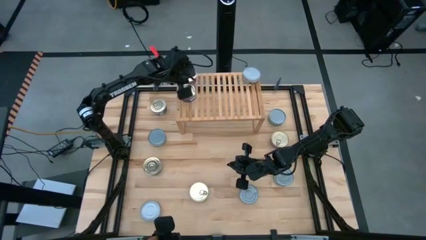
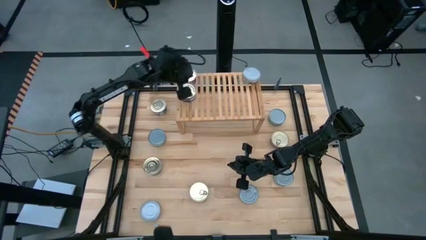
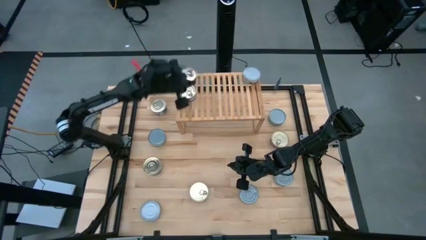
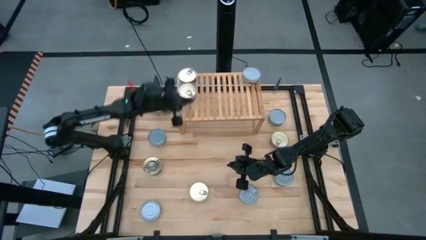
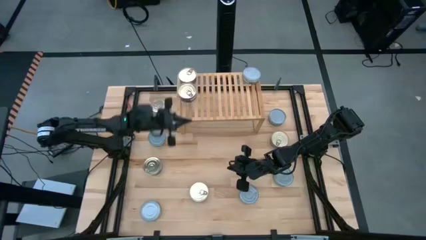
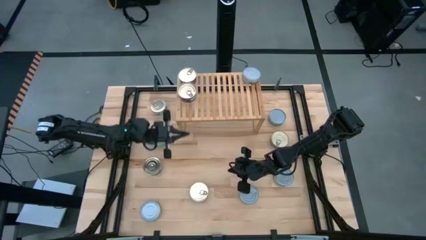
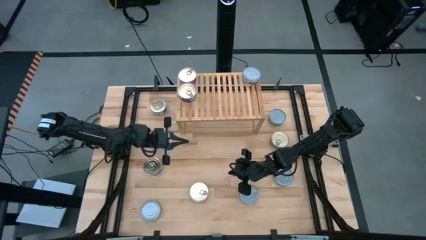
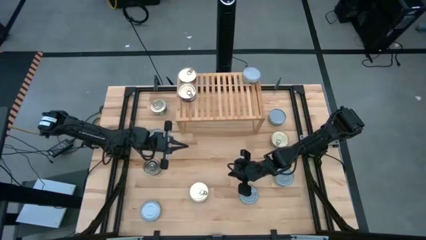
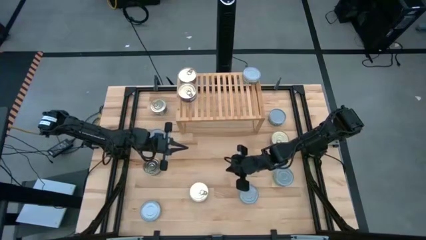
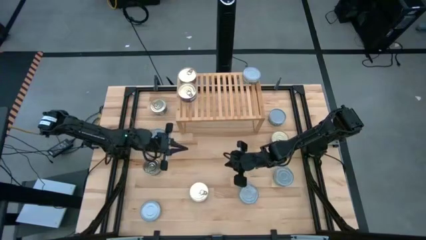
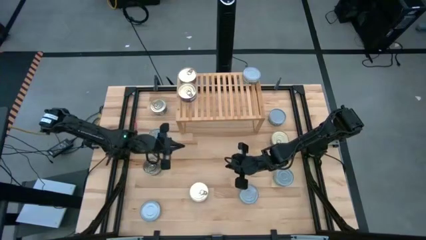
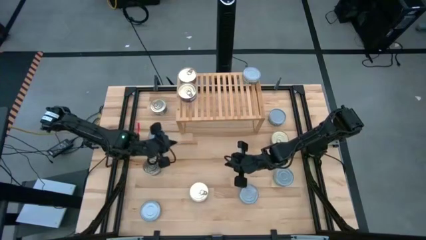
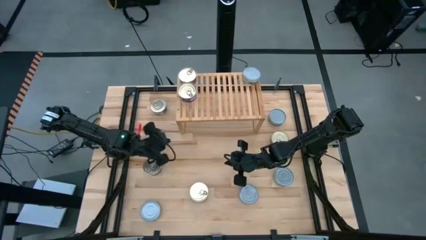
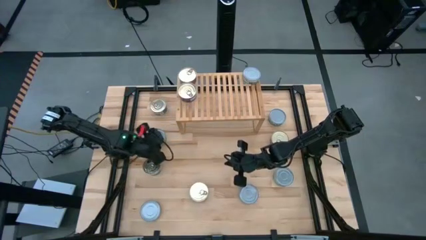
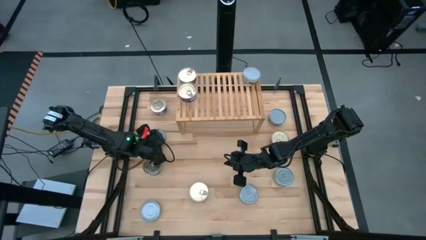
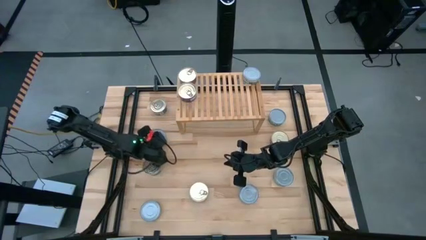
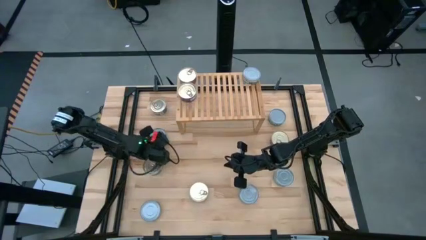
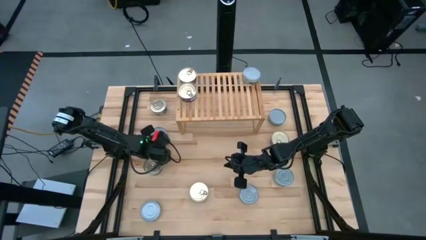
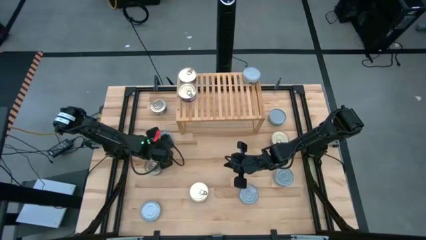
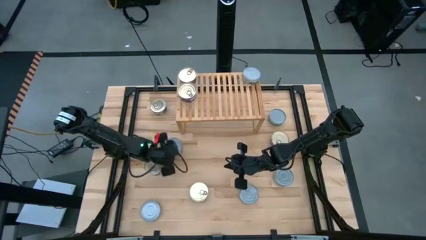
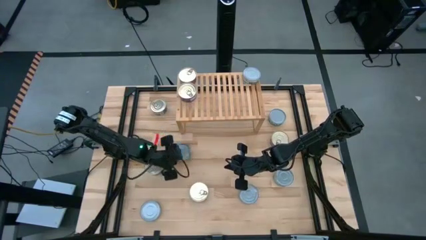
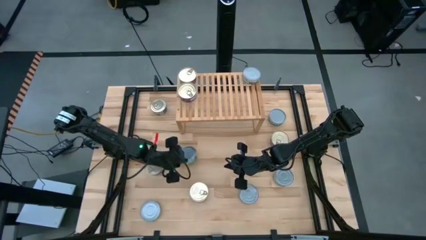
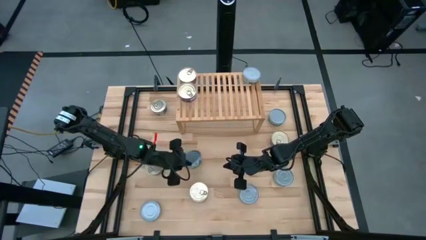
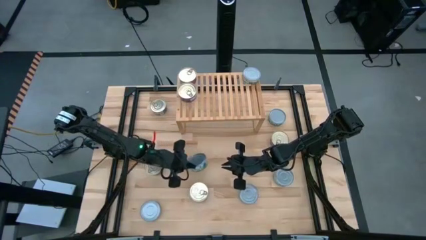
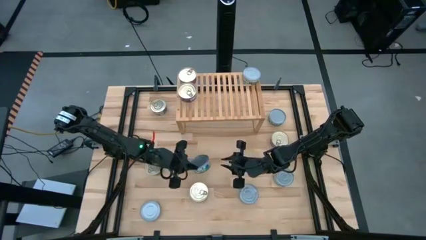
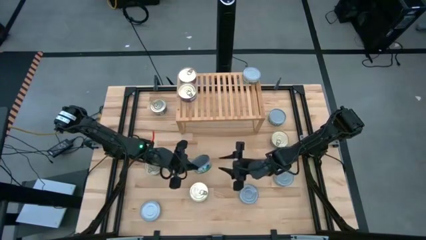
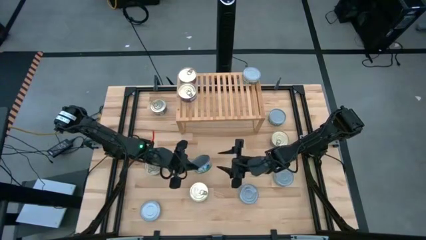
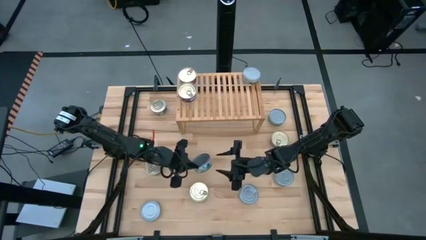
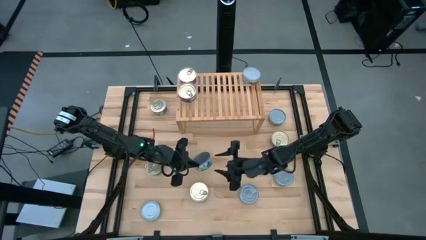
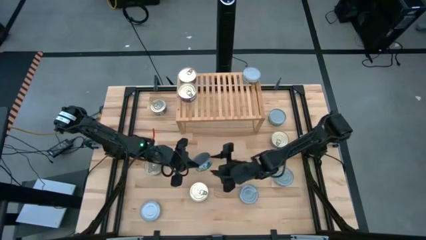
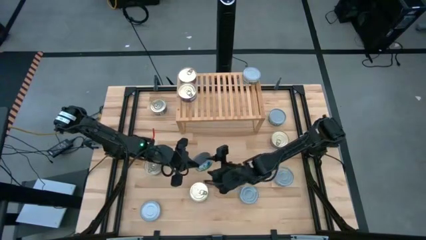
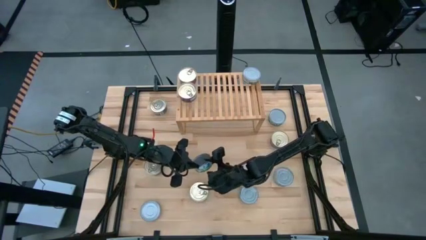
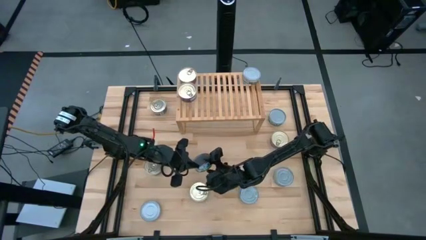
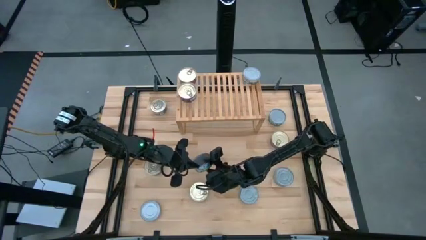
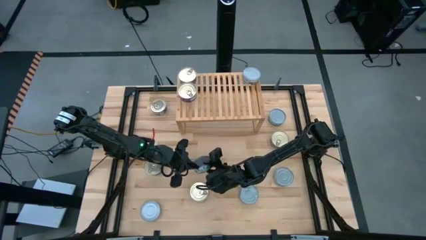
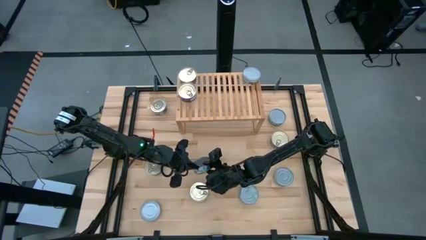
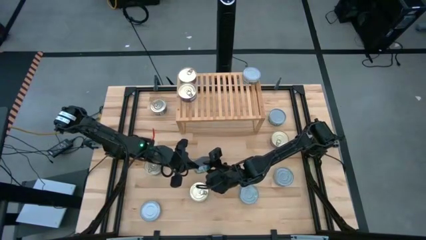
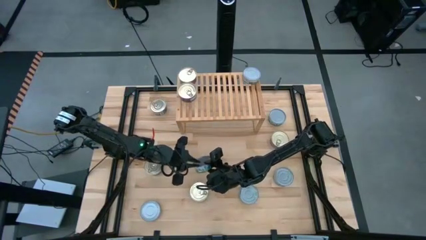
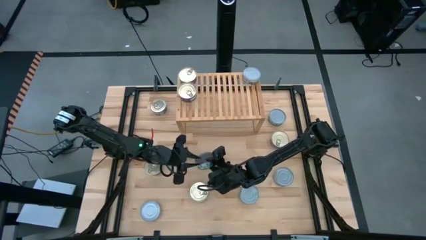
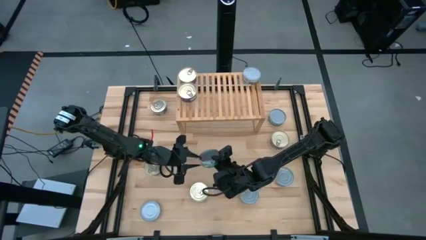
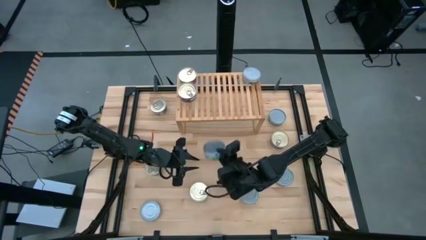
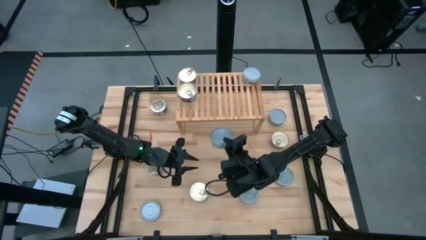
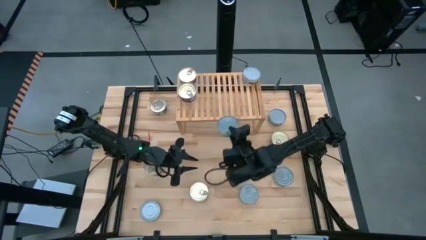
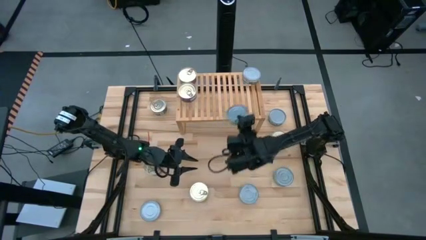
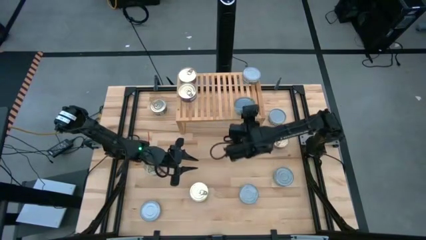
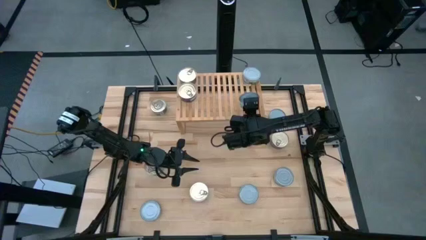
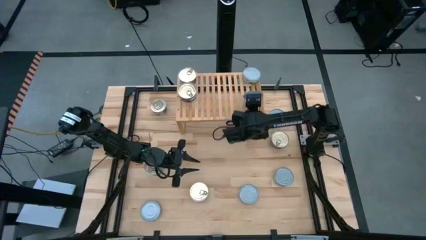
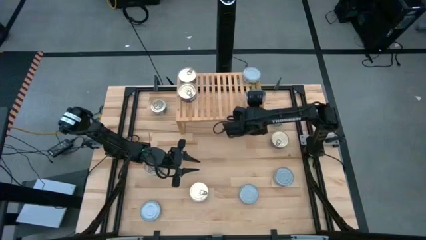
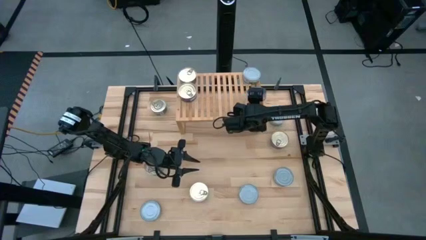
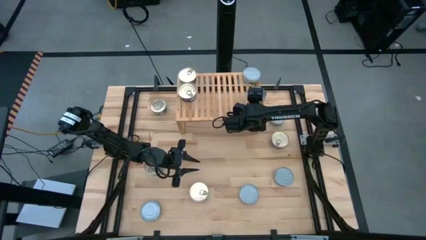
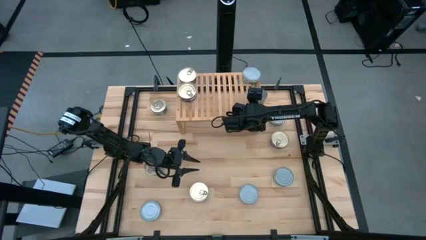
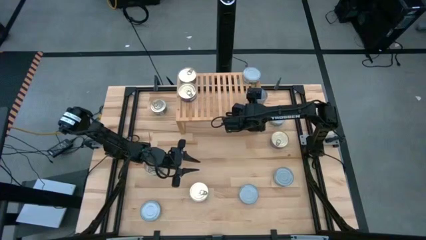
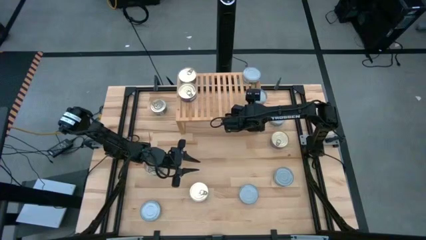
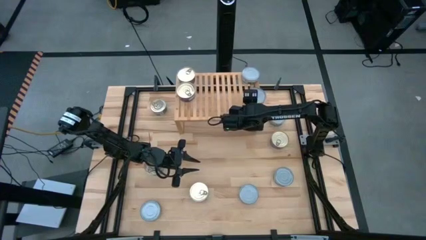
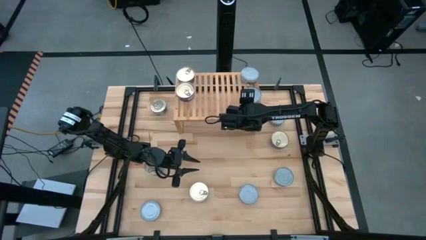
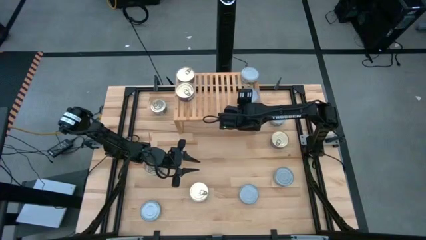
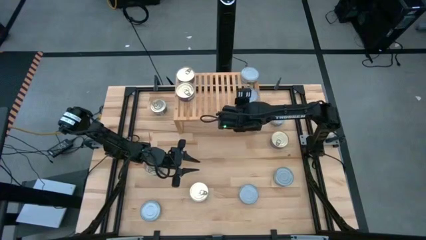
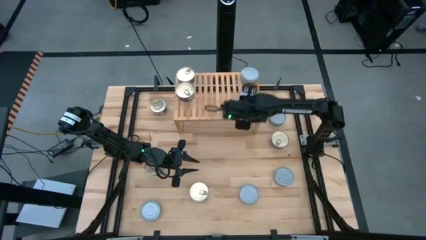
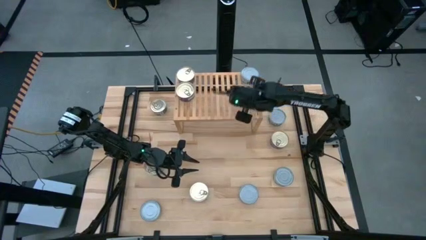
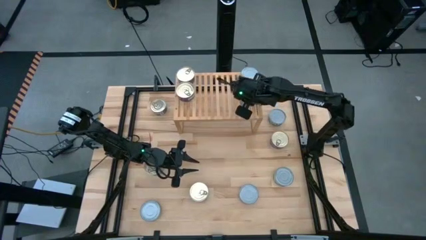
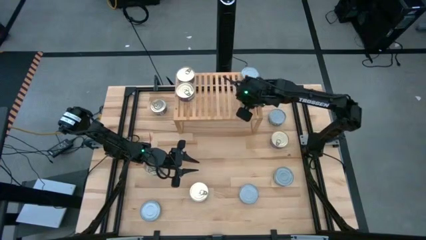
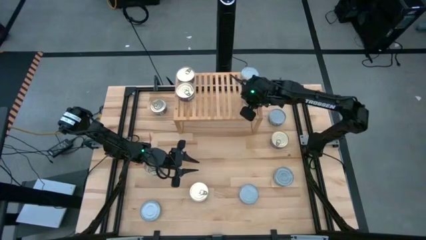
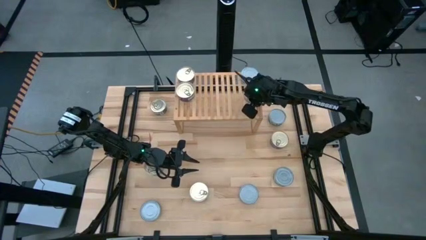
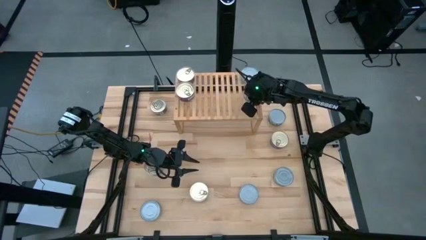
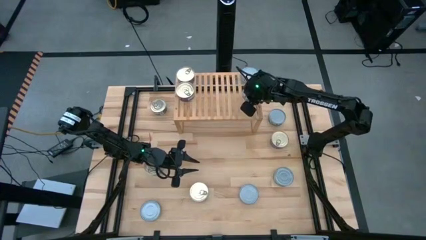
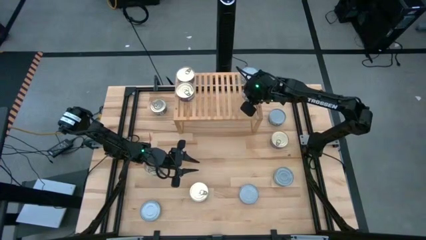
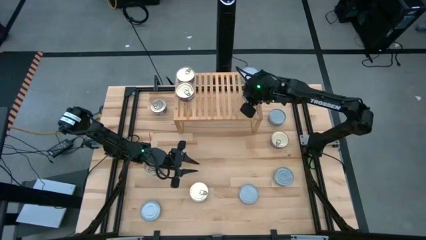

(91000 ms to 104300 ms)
Task: Stack canned seafood by type on shelf
Put the green tuna can on the shelf

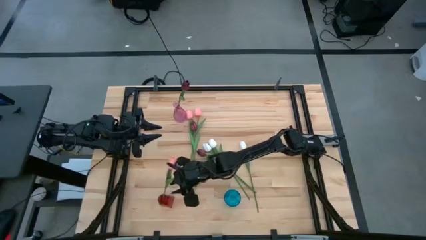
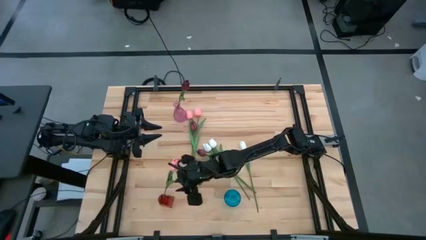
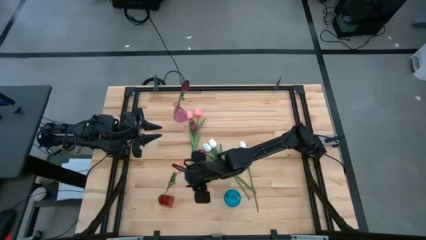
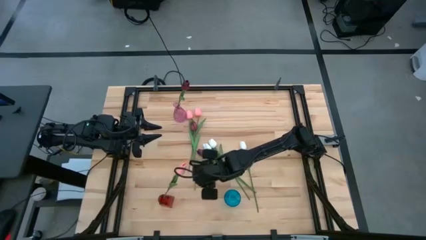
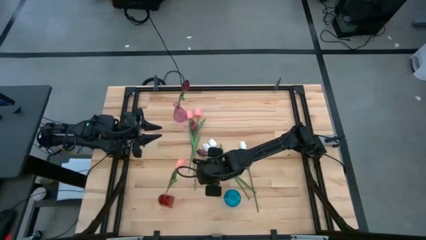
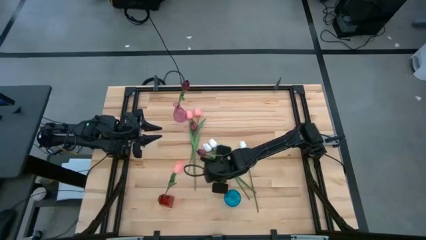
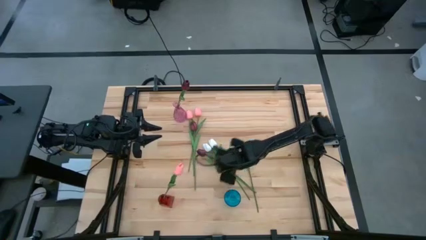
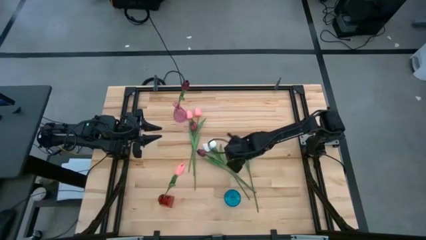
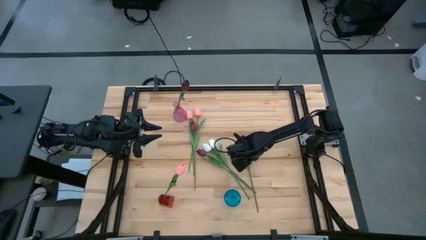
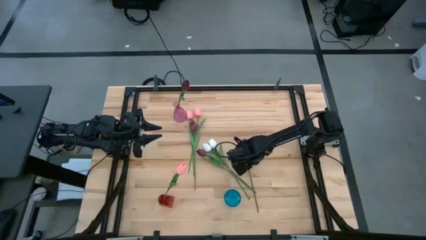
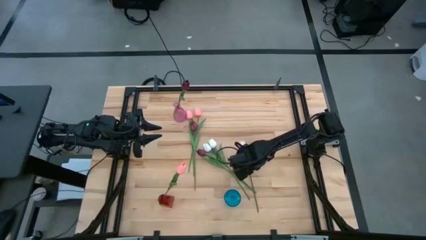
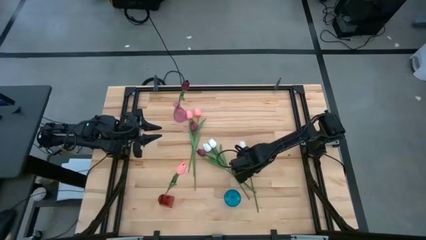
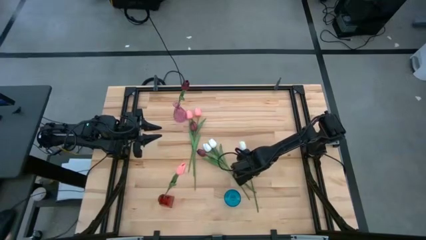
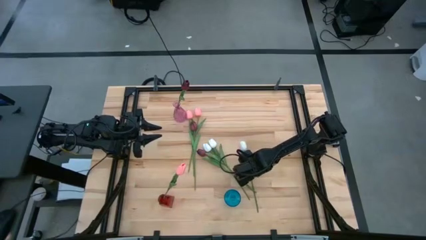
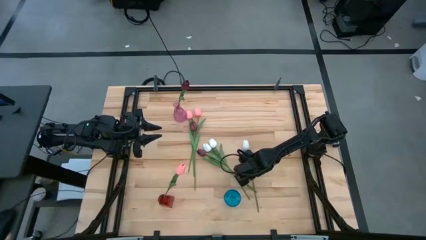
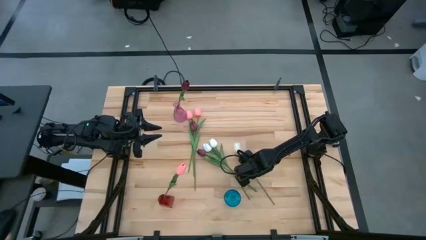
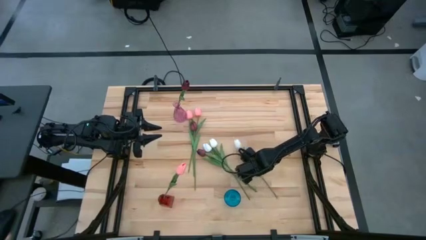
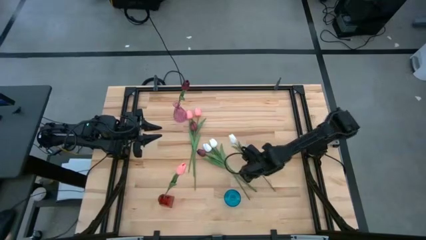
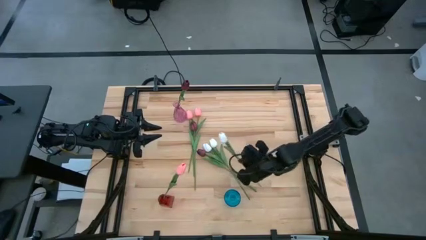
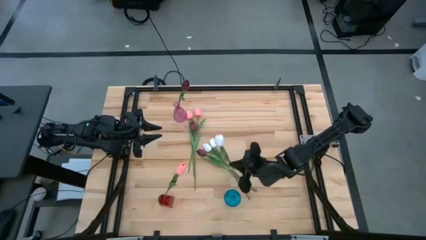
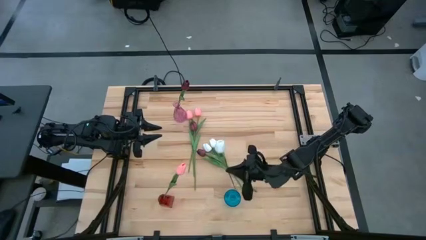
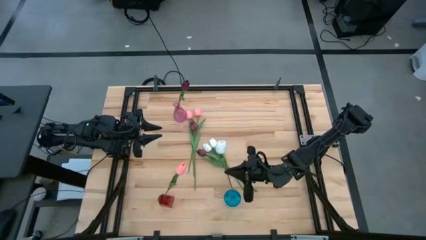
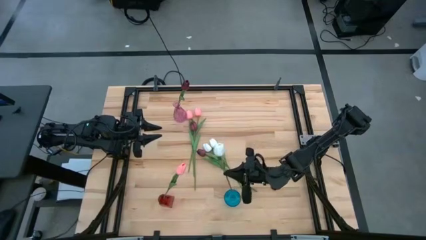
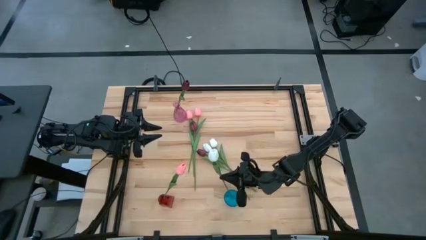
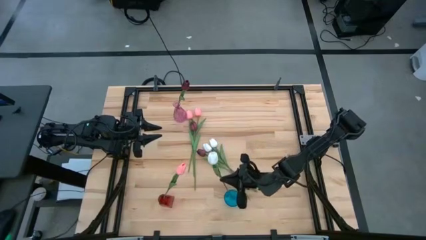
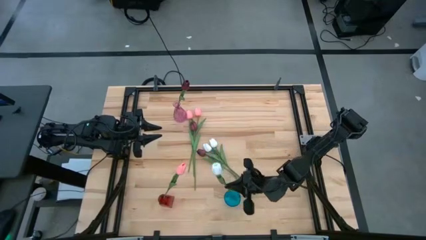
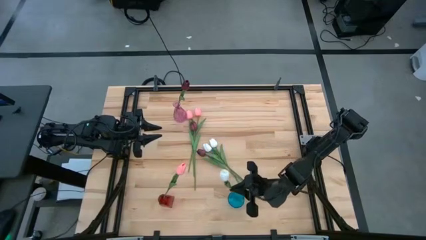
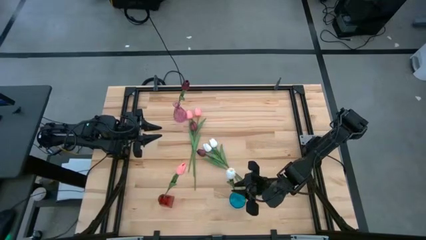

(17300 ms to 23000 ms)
Task: Sort flowers into vase by color
Put the right white flower into the blue vase
